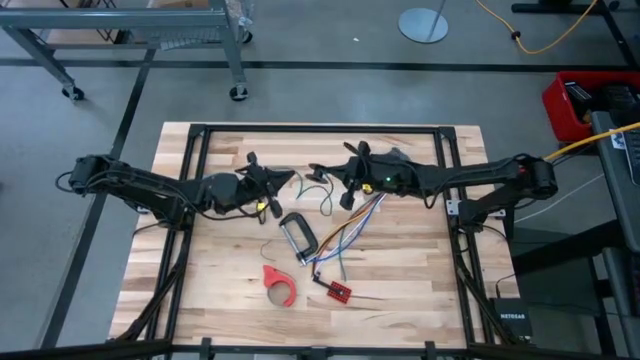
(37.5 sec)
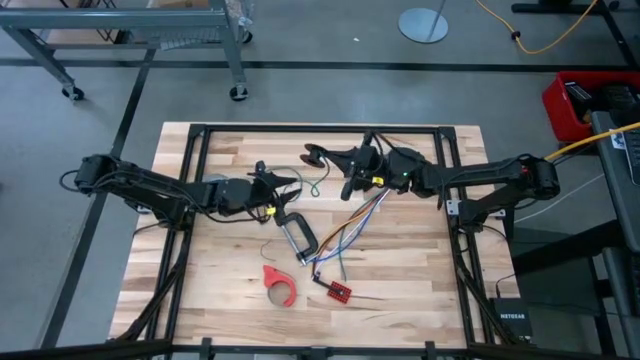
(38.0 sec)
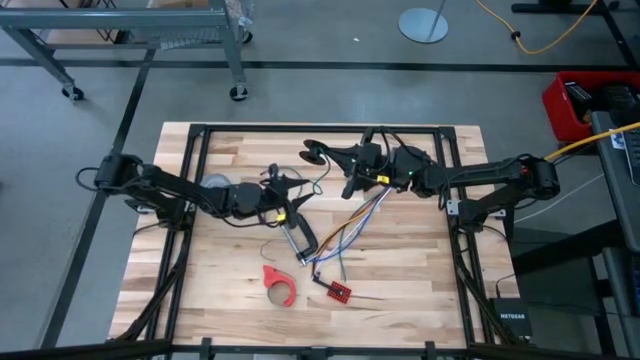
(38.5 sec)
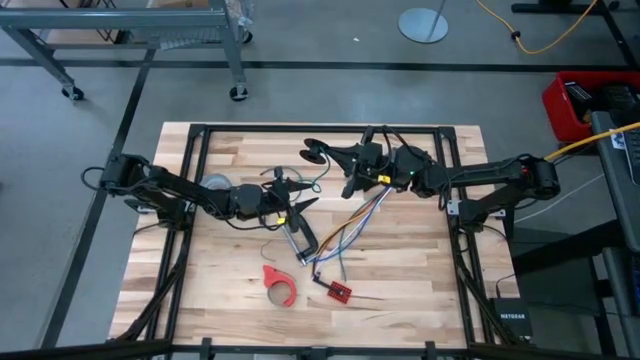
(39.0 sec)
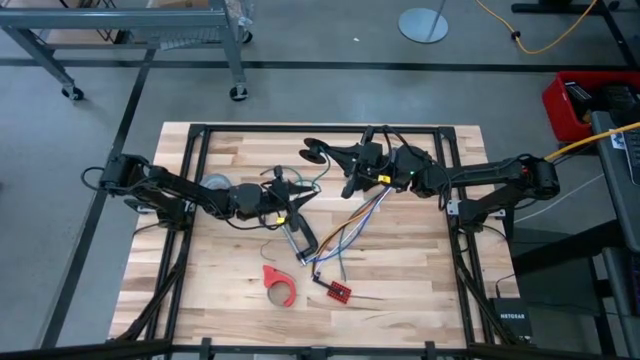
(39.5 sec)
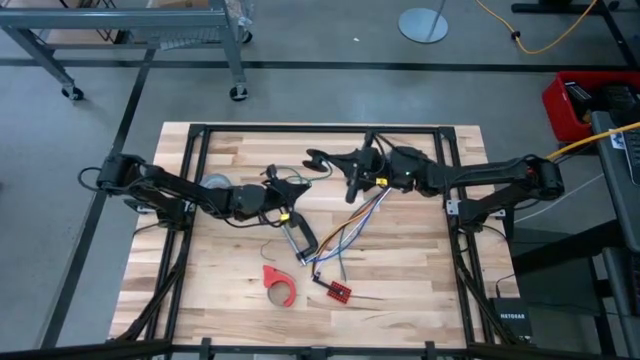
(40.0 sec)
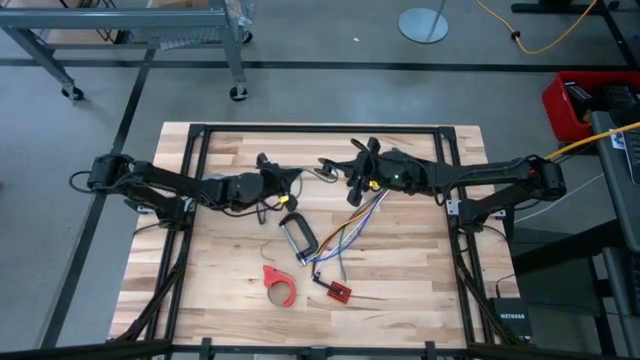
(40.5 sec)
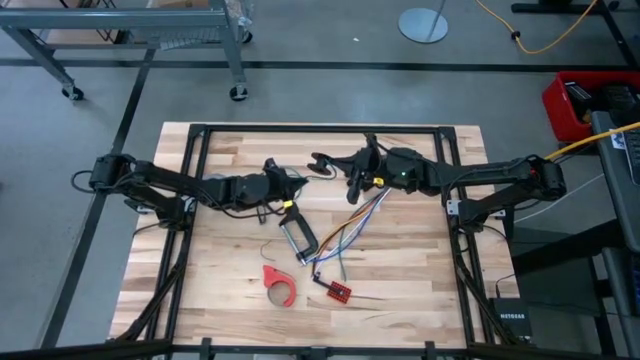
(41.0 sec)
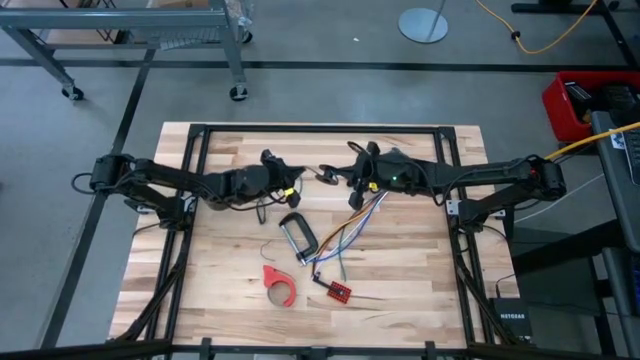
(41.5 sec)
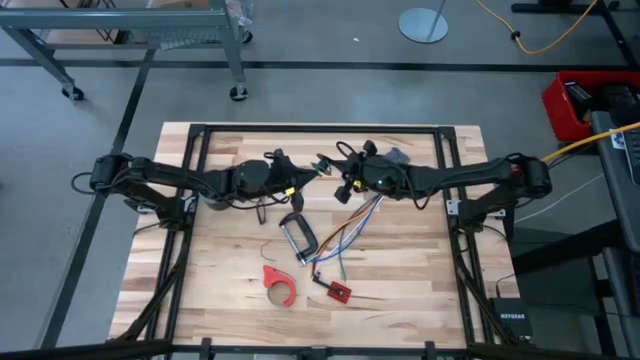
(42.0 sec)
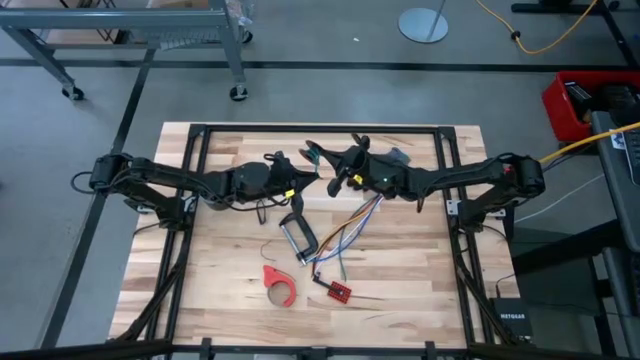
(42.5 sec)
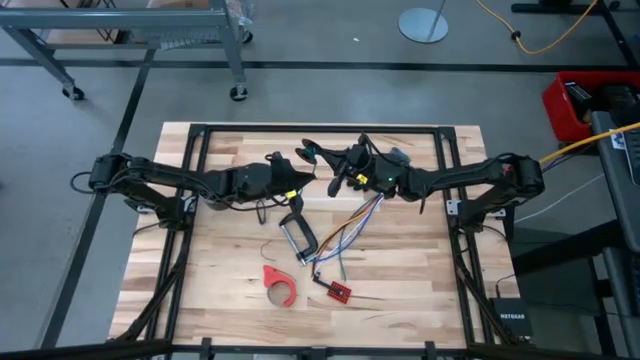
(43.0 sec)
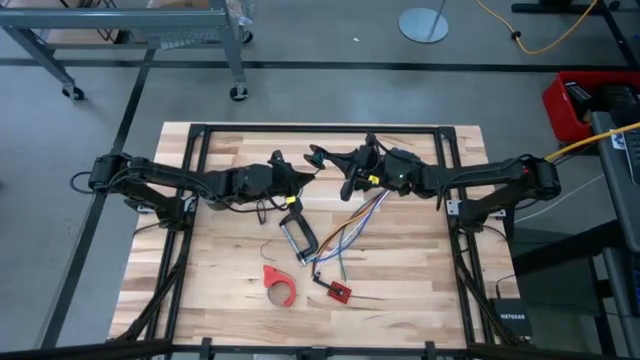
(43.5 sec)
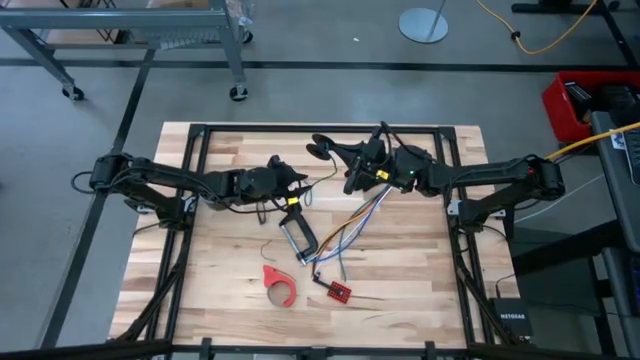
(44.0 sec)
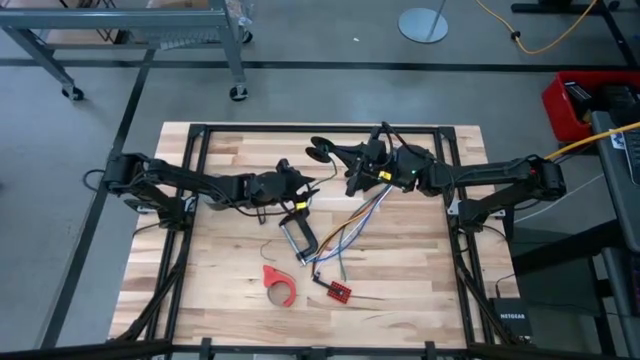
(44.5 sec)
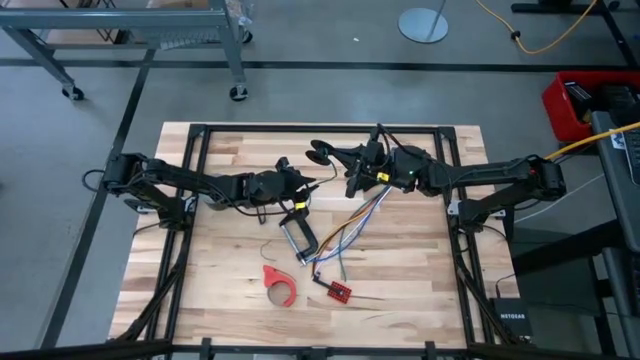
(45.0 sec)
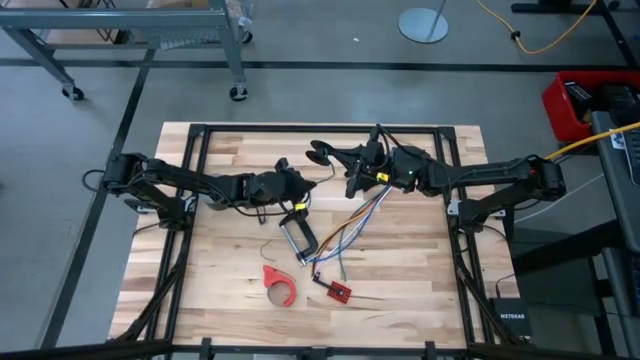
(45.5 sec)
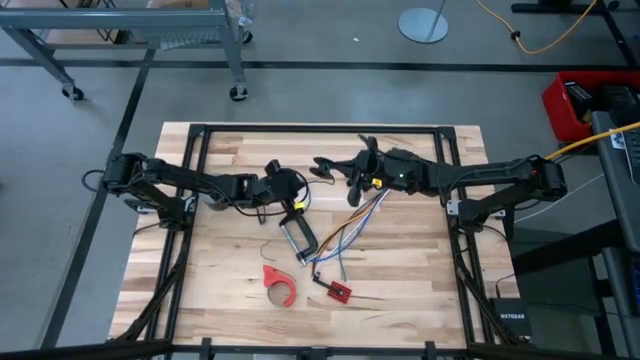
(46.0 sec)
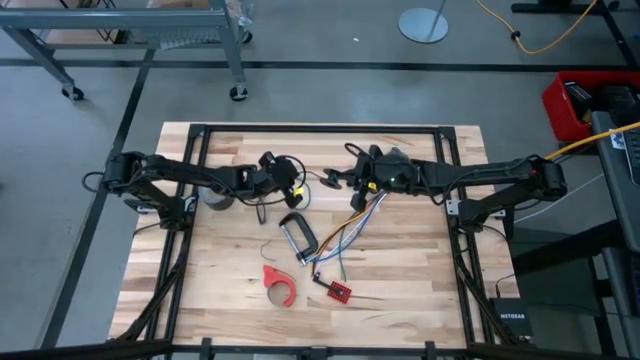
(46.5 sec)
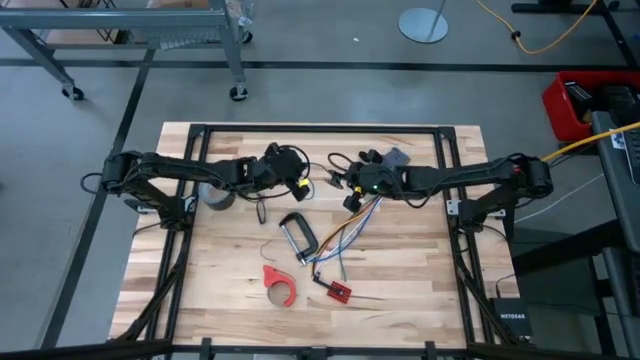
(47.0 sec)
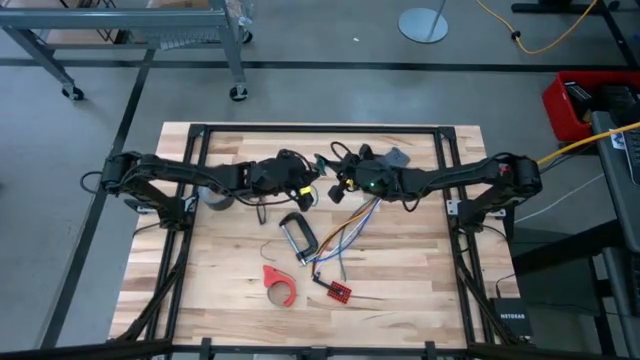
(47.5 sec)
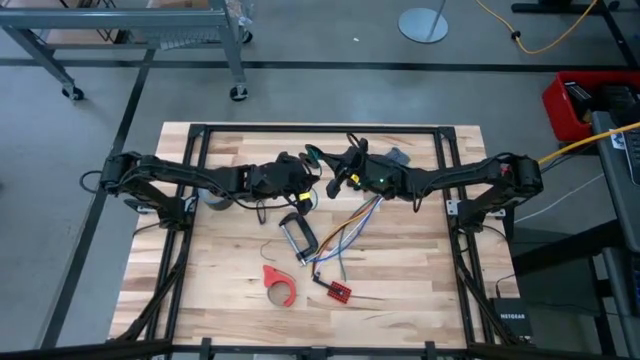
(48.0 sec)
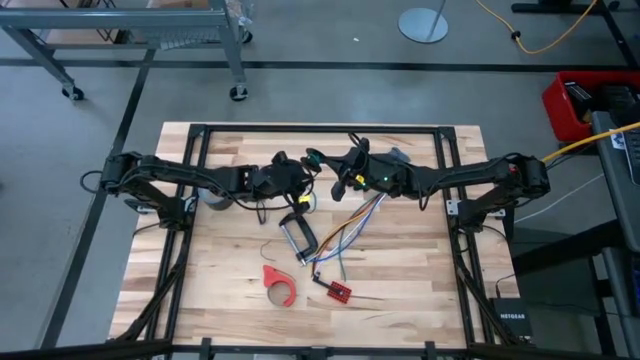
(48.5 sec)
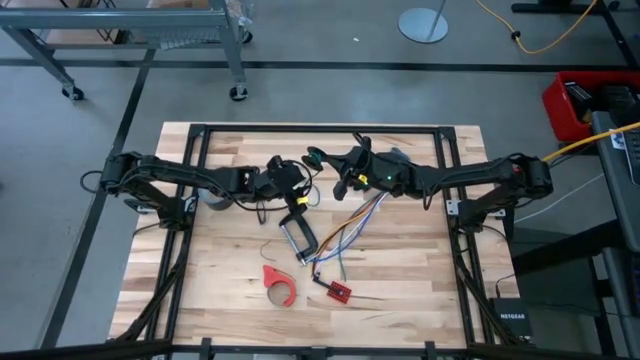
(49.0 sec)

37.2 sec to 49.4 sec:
Task: Coil cords
Coil the green wire around the spool

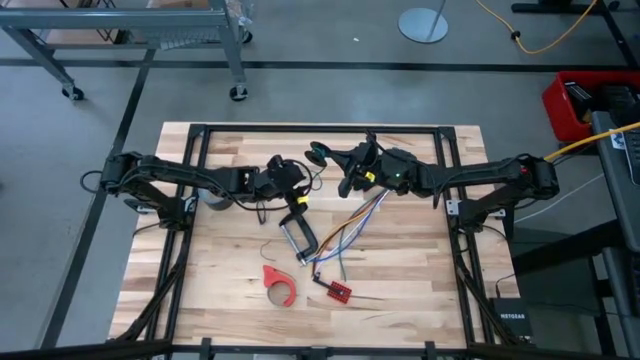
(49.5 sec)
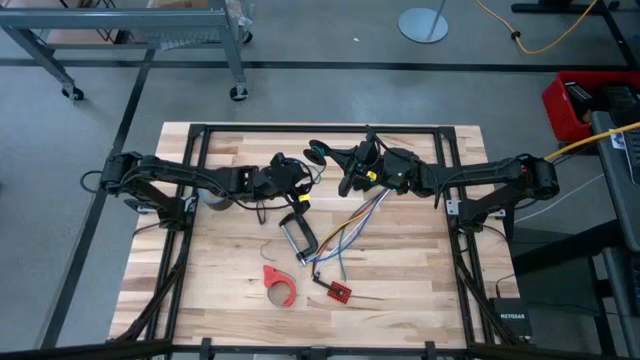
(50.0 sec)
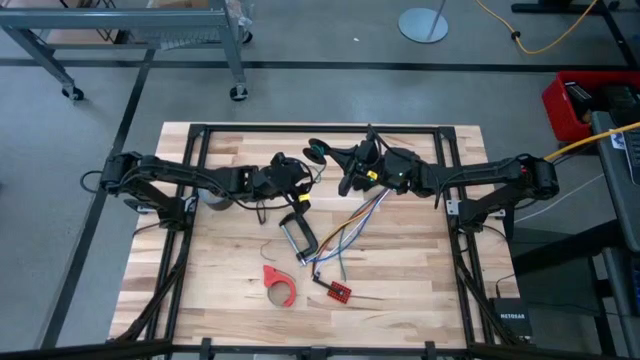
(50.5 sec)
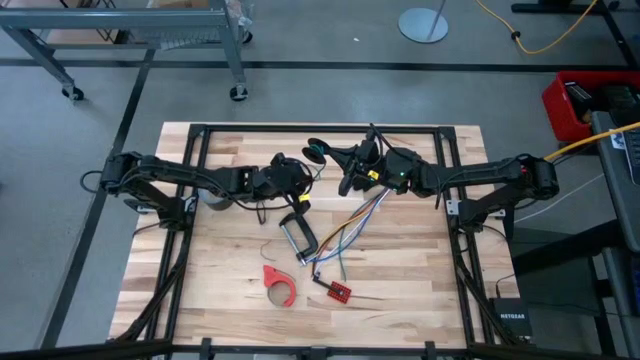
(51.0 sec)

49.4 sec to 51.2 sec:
Coil the green wire around the spool

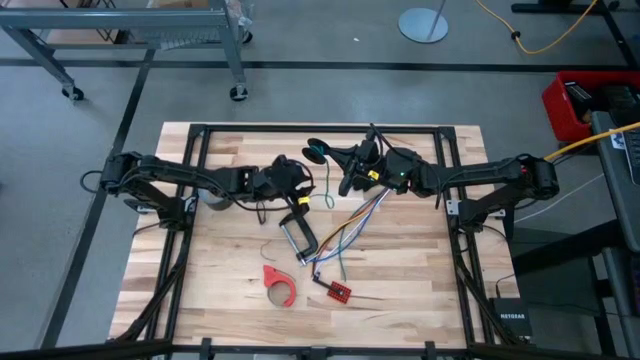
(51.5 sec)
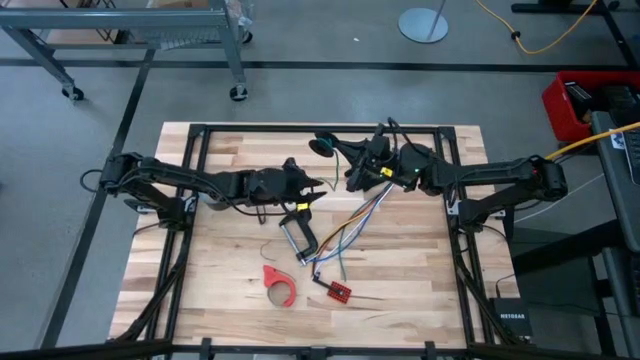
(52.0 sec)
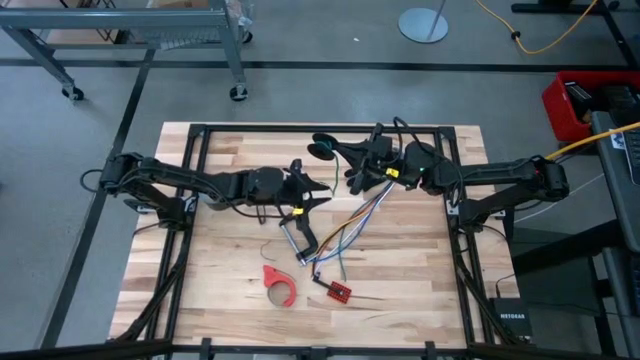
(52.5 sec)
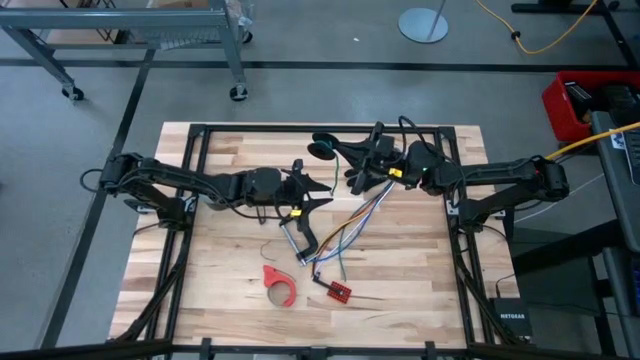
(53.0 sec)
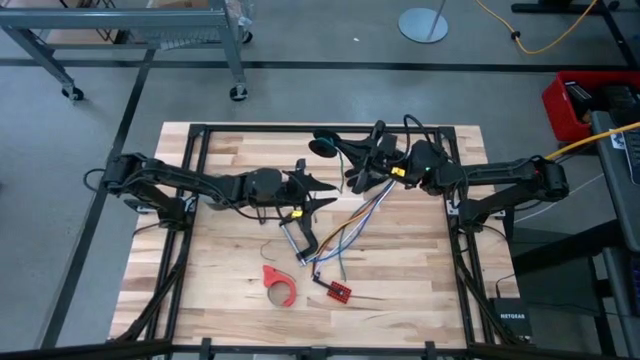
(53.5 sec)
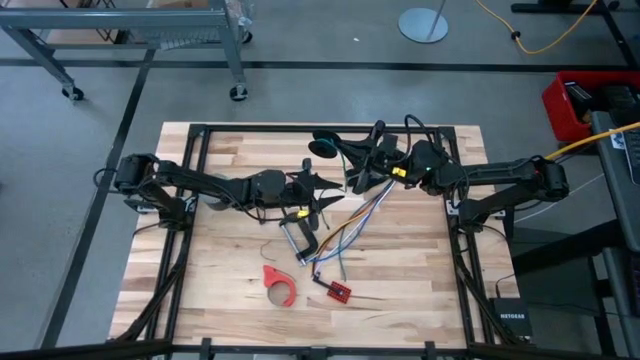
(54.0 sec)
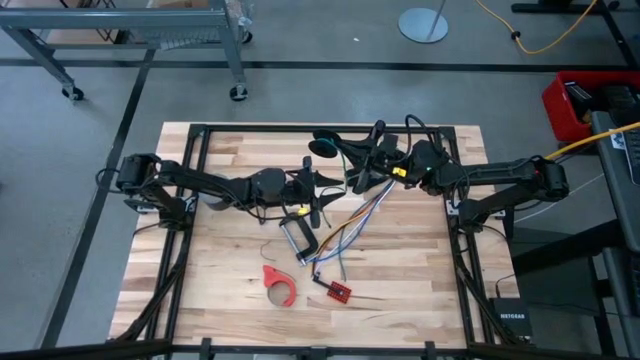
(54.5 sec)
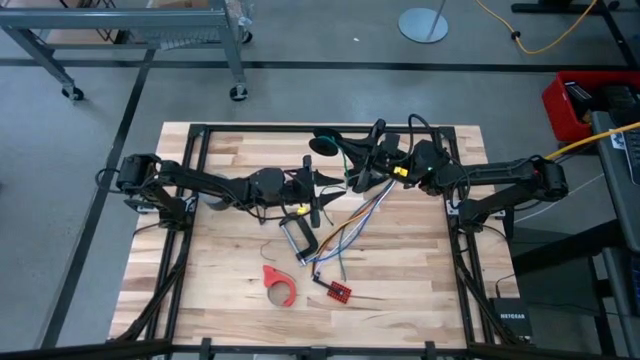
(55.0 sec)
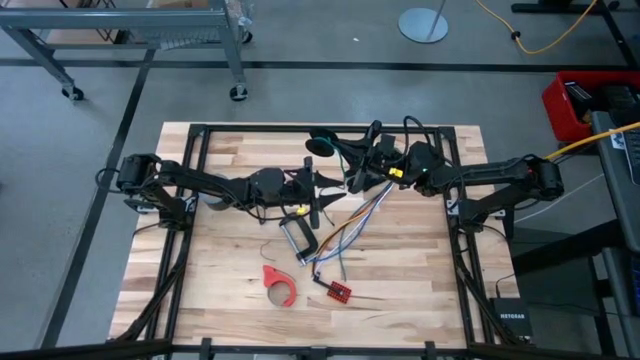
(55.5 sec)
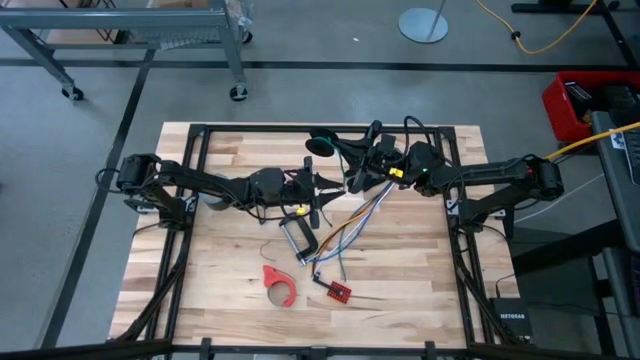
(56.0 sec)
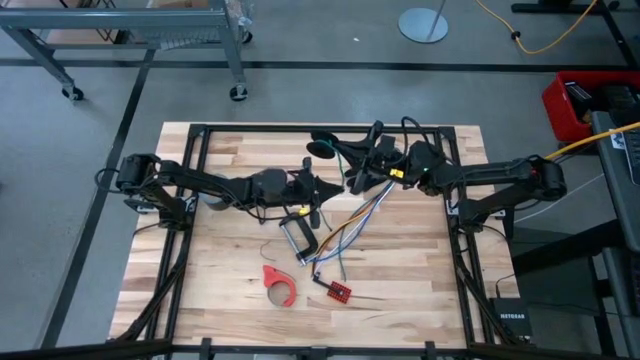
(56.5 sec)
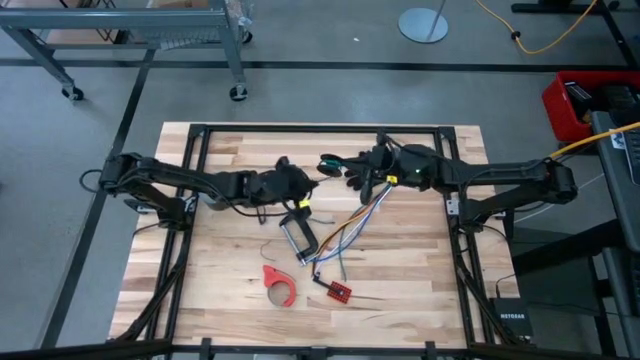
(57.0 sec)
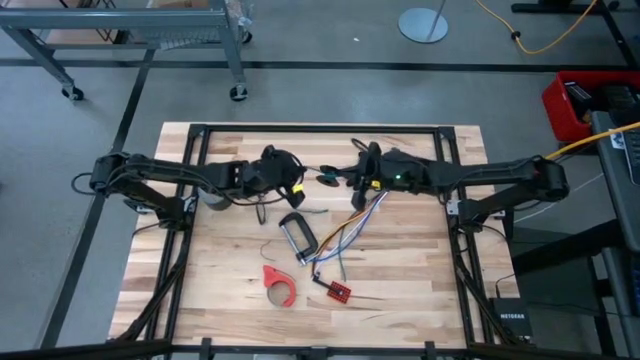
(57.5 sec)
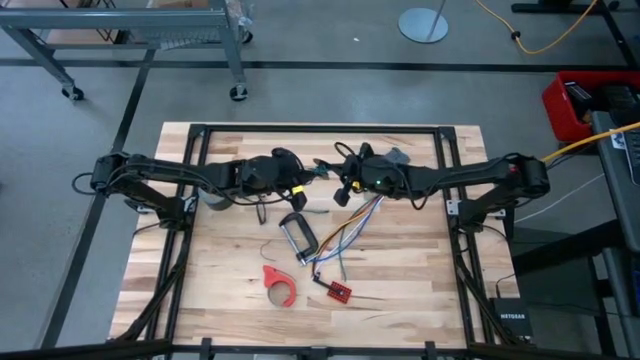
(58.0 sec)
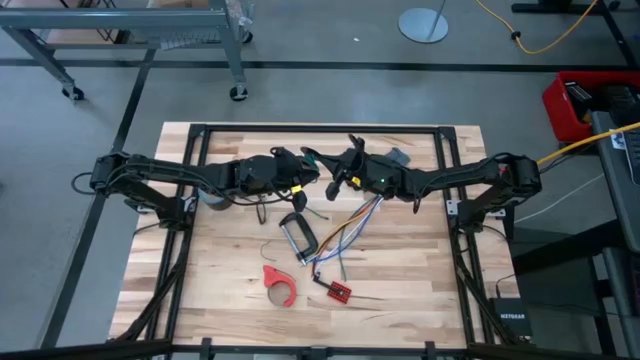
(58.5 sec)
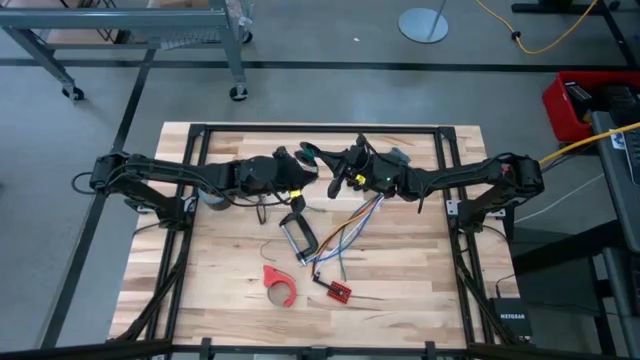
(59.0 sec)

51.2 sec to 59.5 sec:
Coil the green wire around the spool
